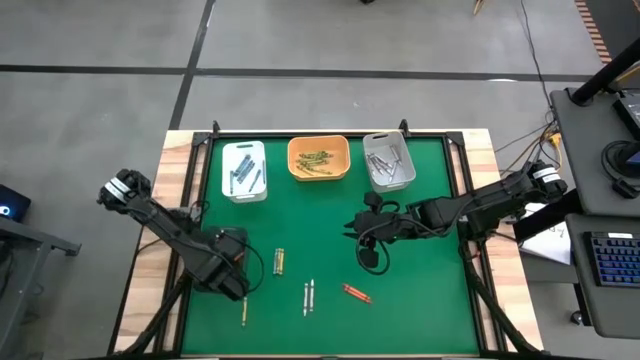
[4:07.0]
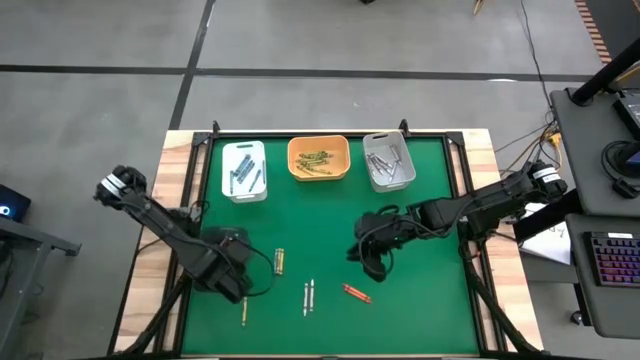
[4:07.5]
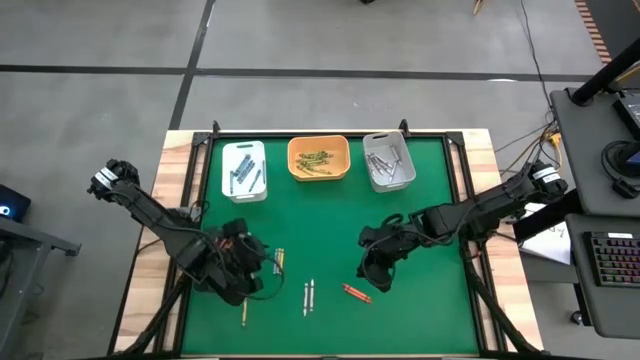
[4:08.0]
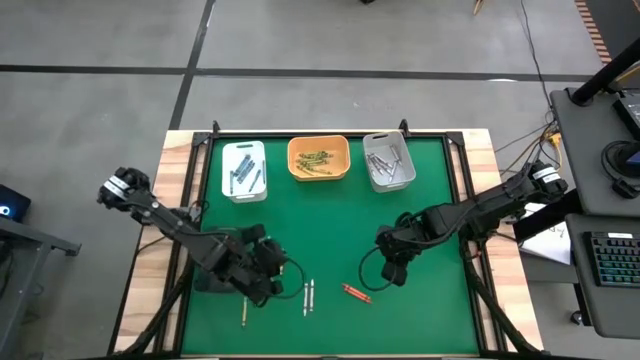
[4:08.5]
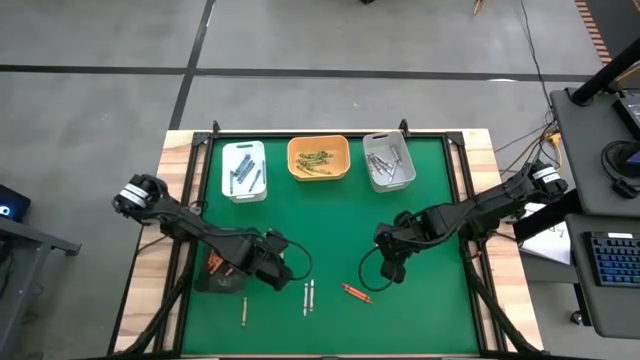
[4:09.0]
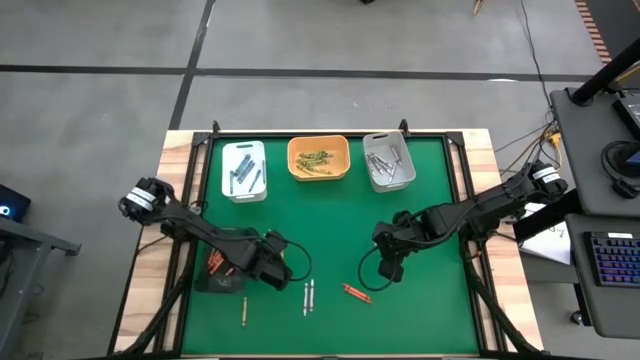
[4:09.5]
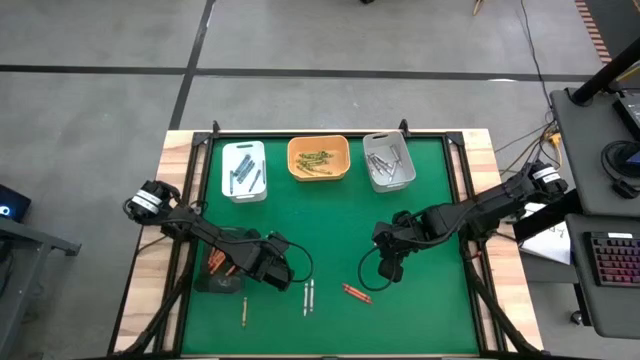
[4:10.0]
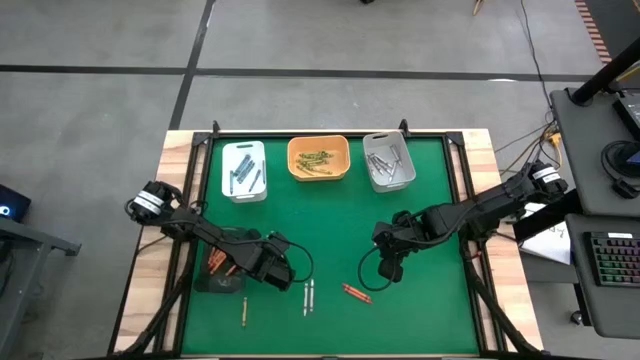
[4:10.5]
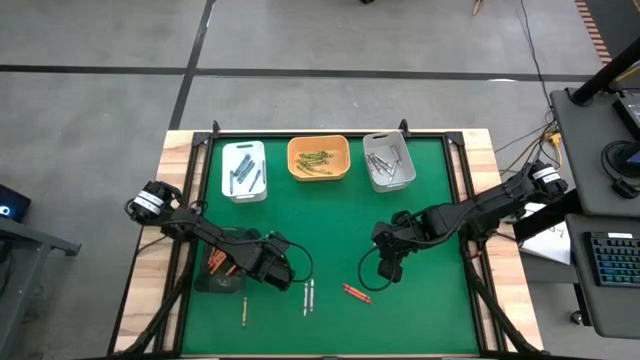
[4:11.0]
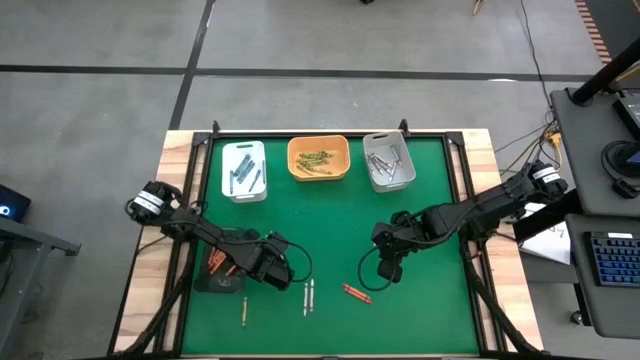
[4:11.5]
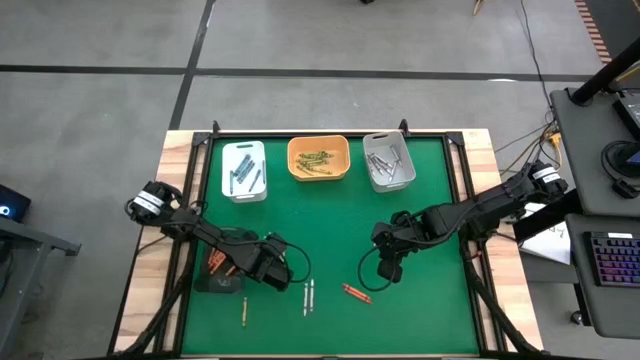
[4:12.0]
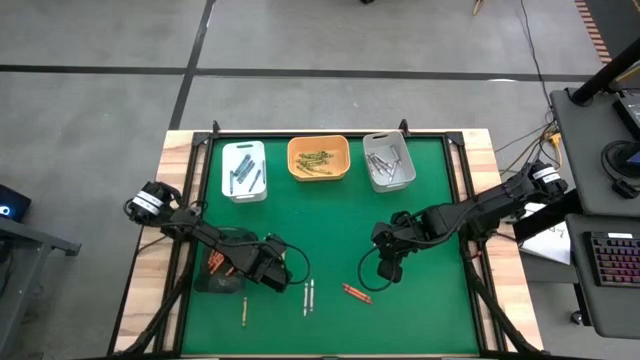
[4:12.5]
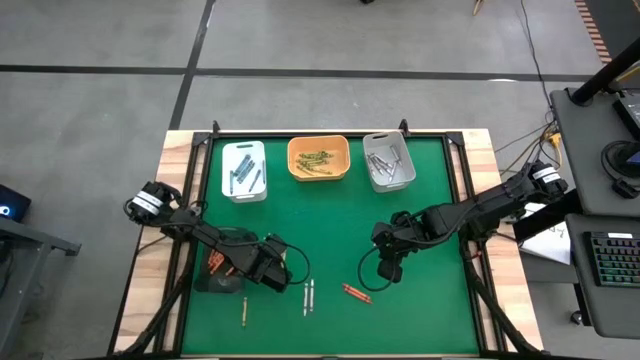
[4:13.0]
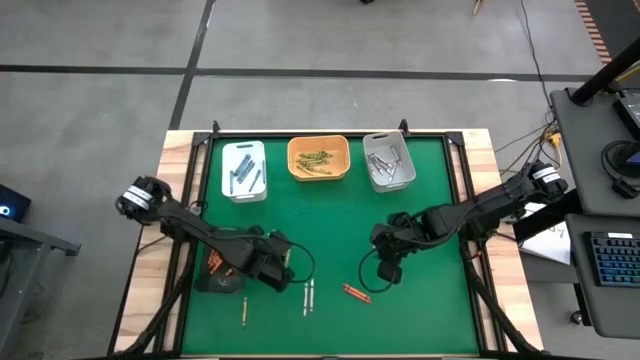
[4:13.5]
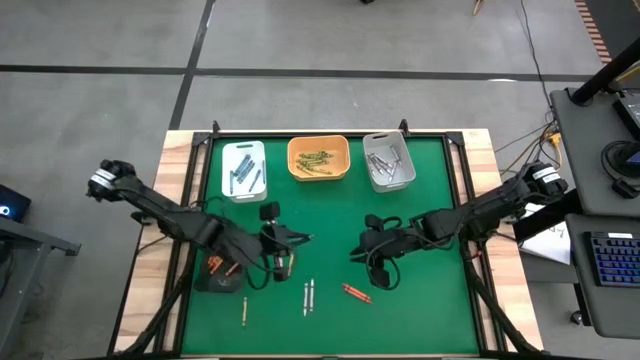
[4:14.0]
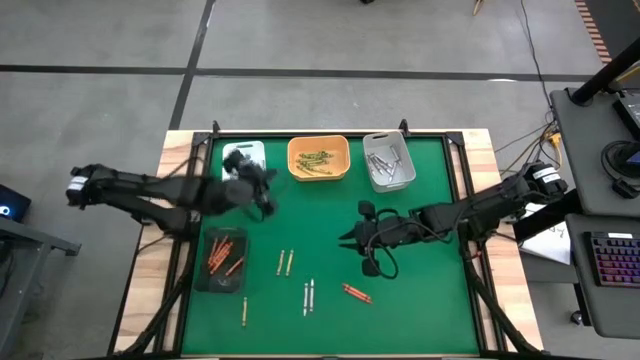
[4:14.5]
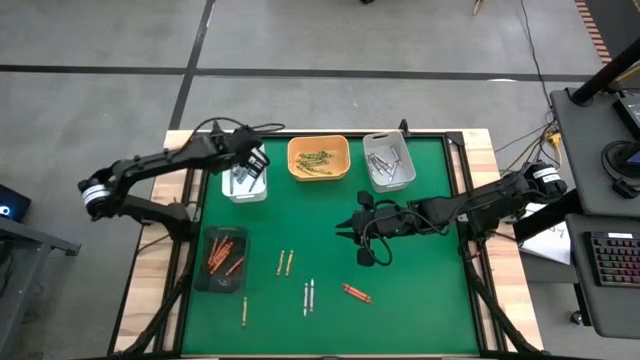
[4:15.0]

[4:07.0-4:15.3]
Task: Sort crayons
Put the blue crayon into the white bin

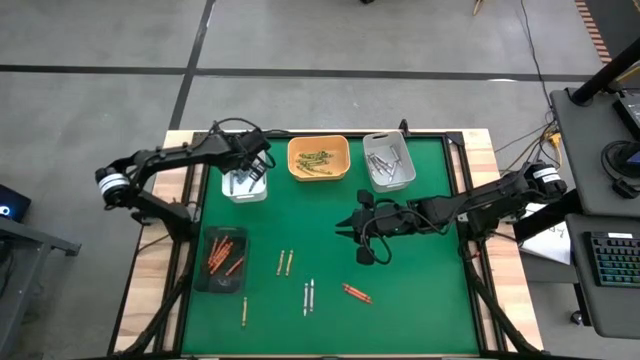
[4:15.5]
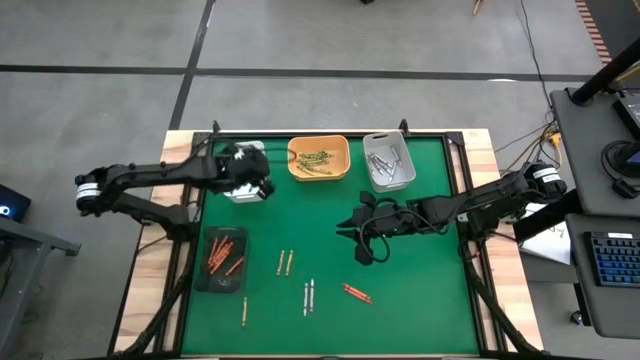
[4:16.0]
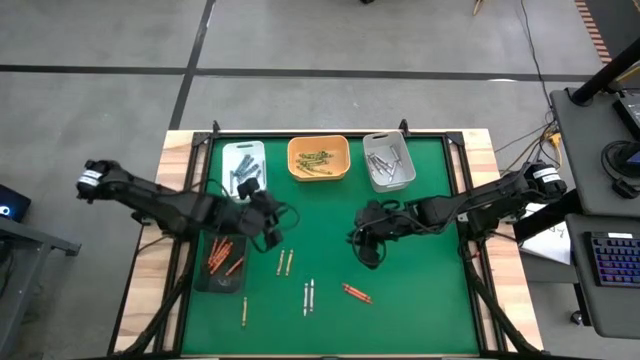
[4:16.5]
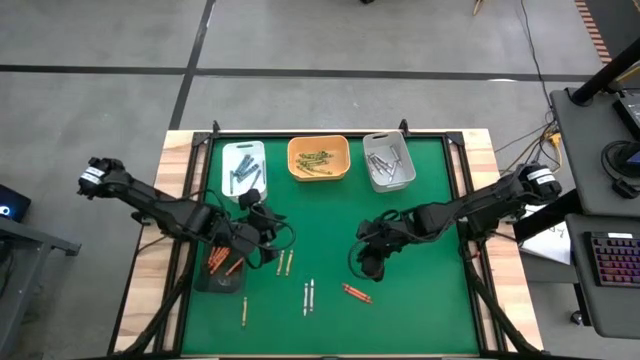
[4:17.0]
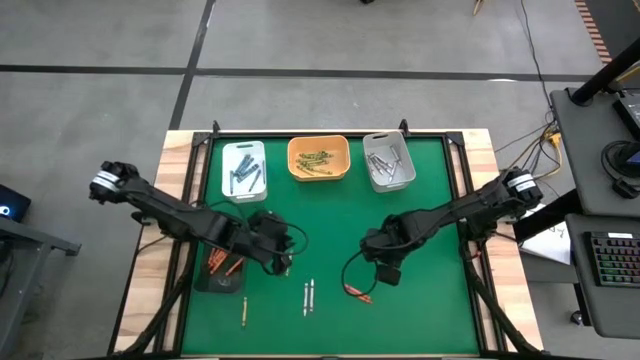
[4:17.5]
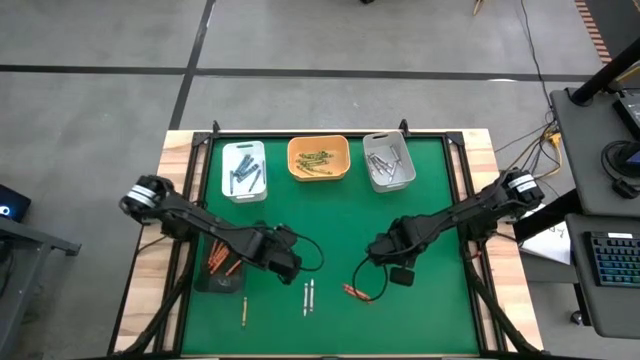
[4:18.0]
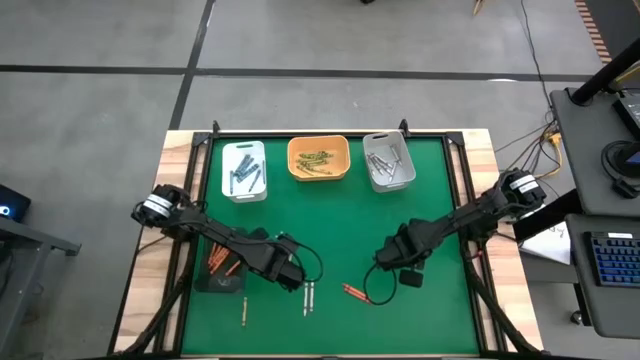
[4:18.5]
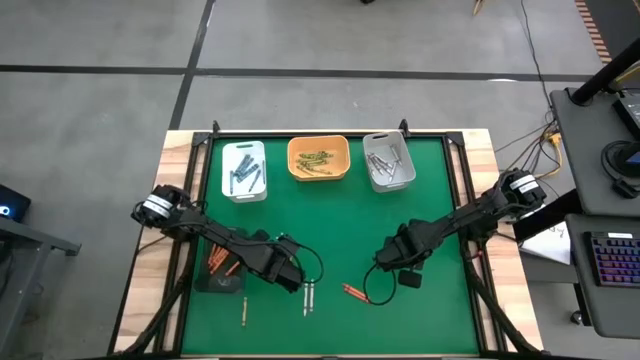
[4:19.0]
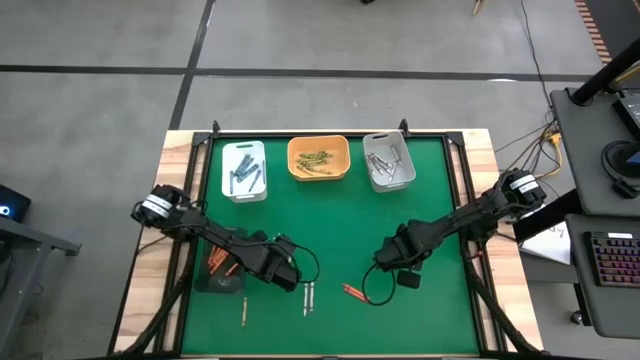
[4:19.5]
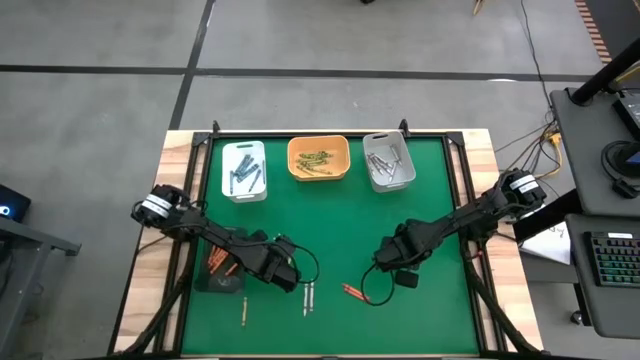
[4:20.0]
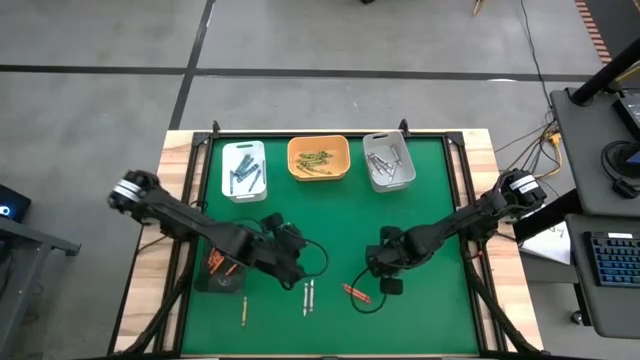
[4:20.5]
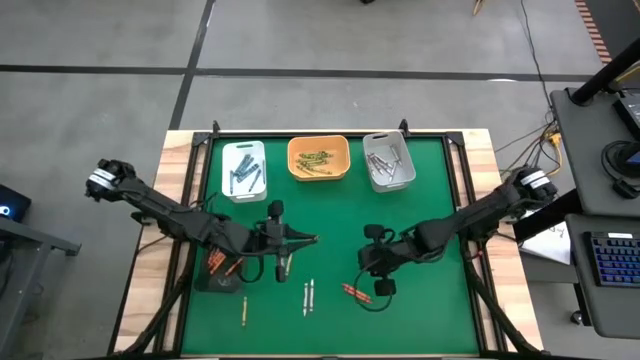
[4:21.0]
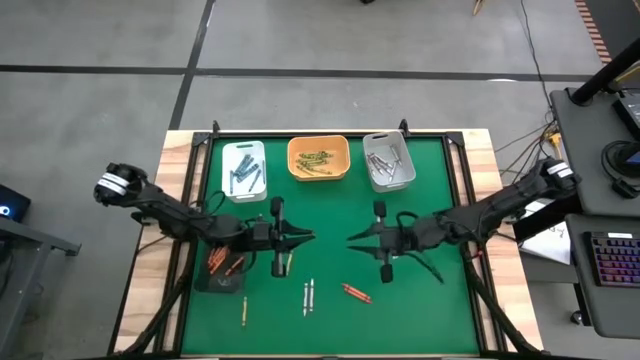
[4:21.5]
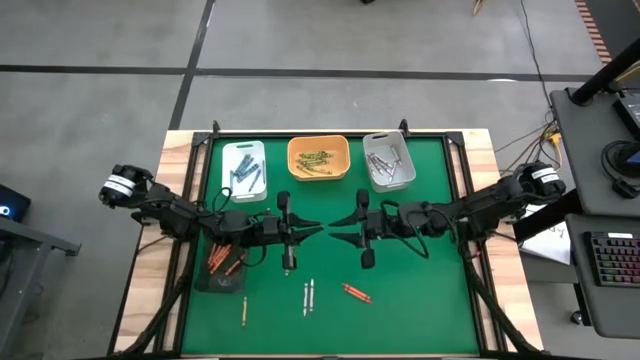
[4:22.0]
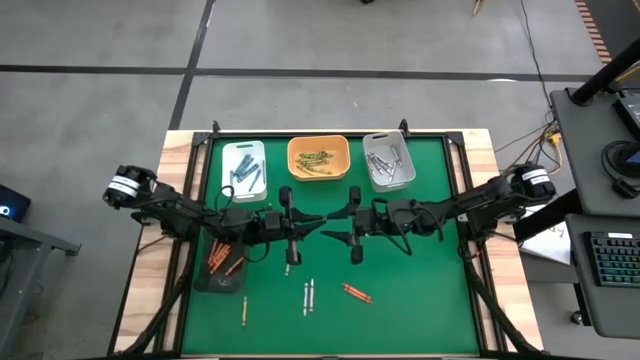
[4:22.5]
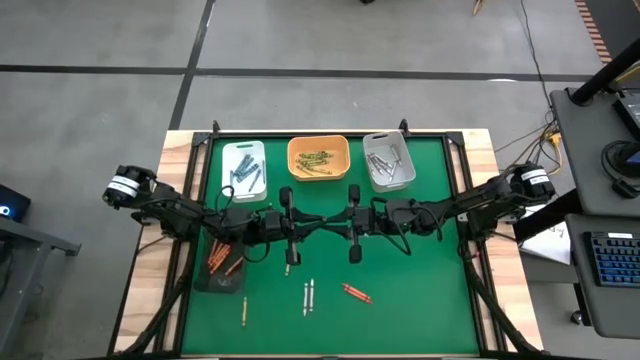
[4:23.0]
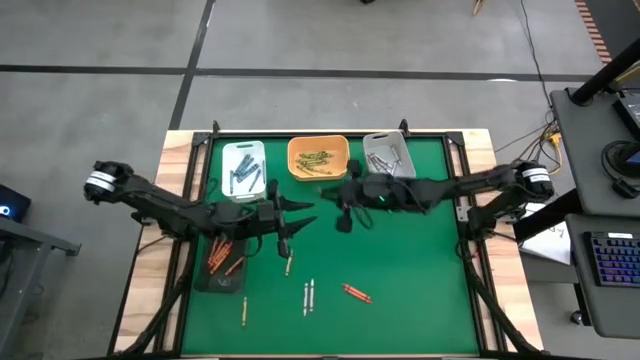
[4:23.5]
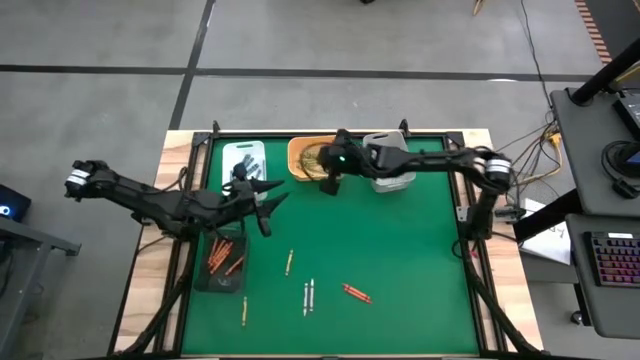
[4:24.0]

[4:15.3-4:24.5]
Put the green crayon into the yellow bin

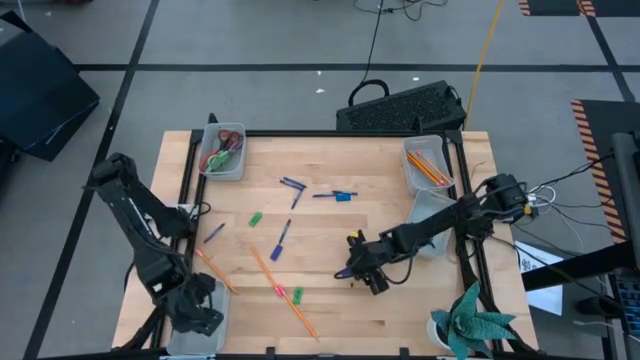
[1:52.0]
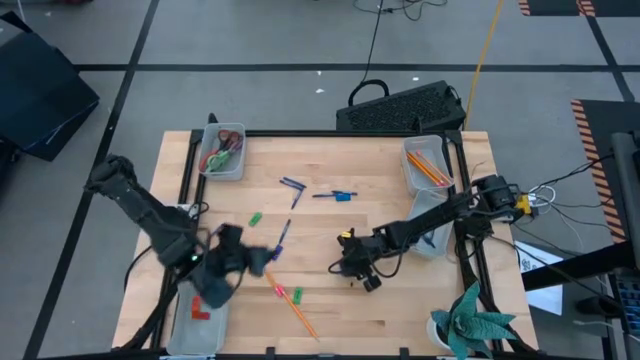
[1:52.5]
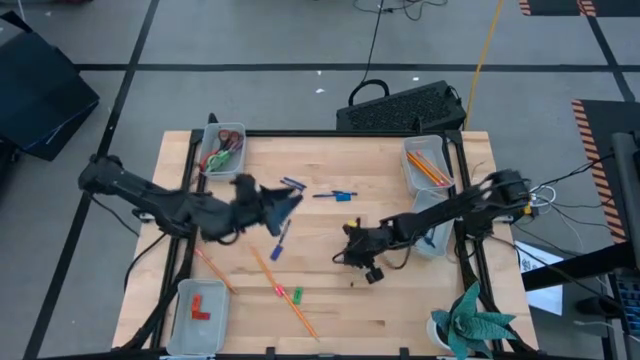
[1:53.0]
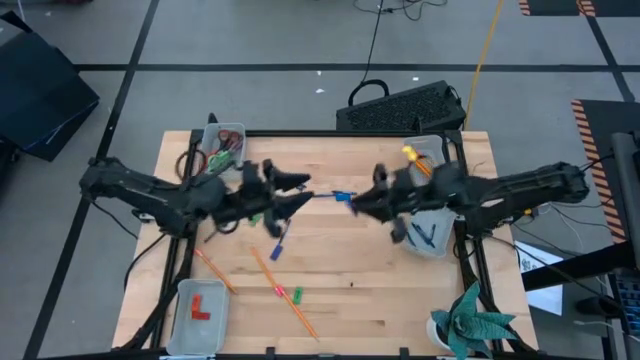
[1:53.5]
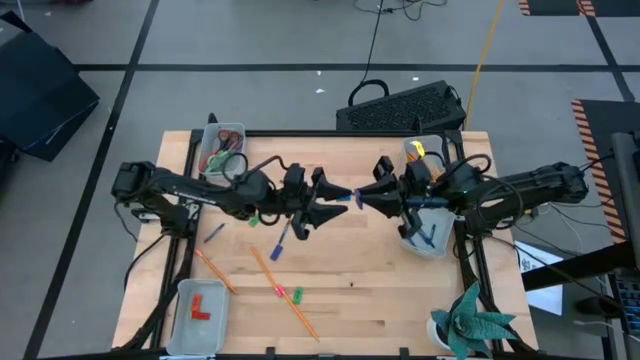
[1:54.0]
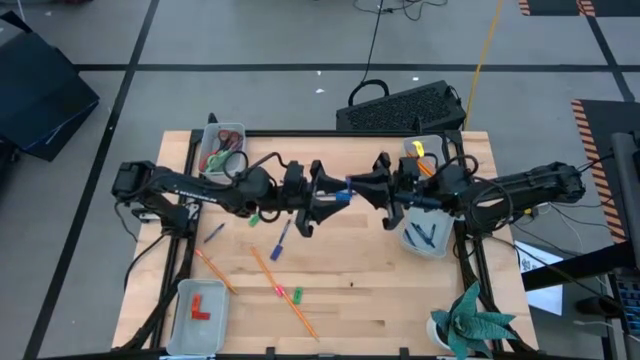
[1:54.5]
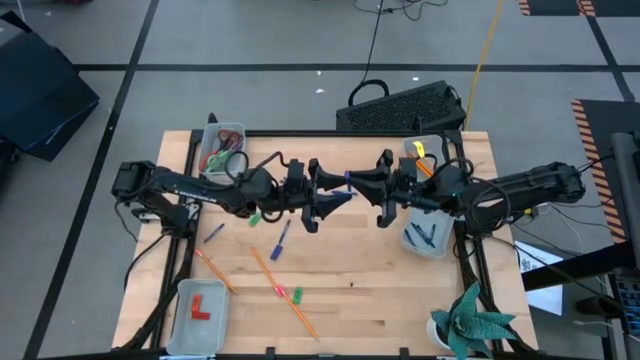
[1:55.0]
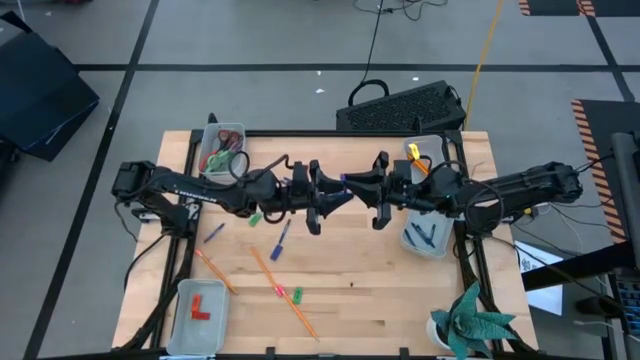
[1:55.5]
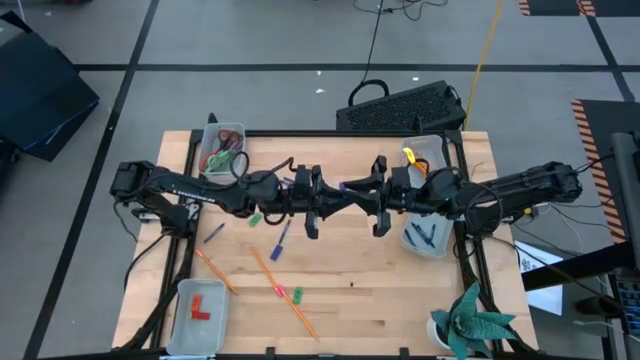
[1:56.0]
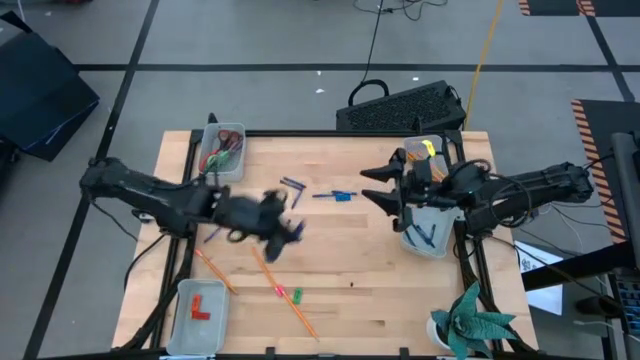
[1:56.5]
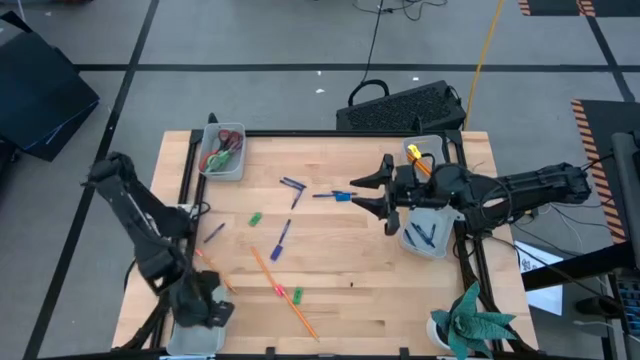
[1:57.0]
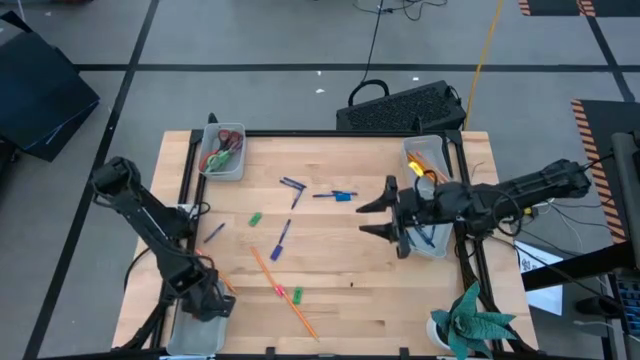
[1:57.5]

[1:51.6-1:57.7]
Task: Sort crayons/erasers/pens/pencils in bins
Put the violet eraser into the bottom left gray bin
